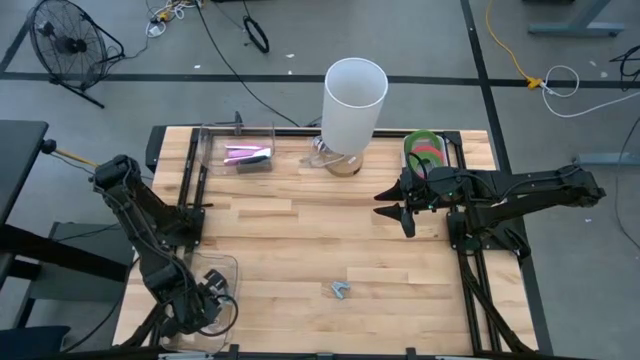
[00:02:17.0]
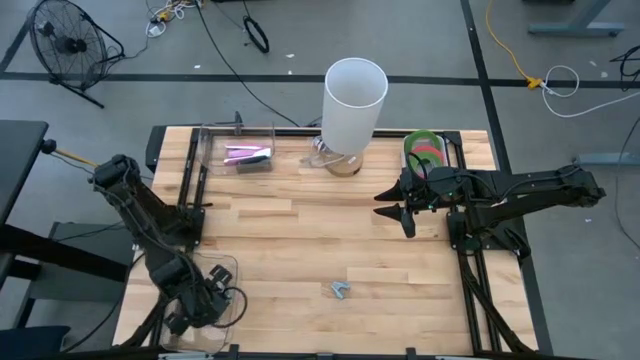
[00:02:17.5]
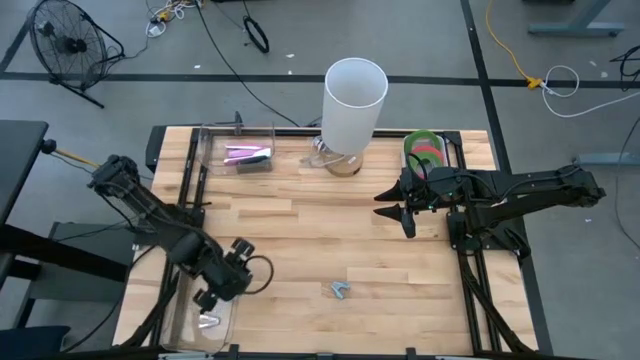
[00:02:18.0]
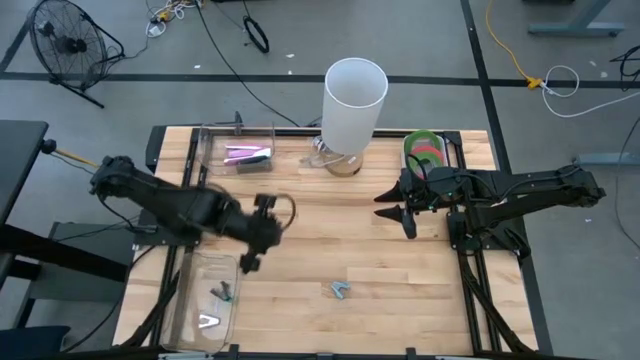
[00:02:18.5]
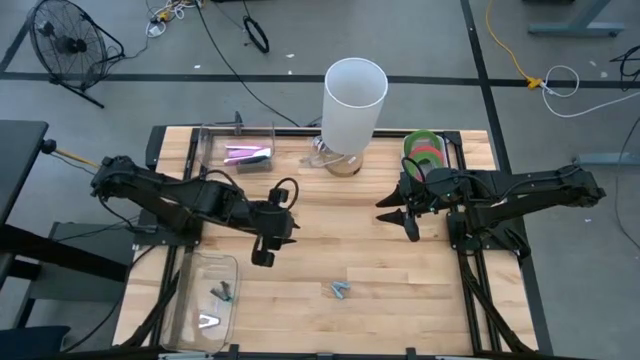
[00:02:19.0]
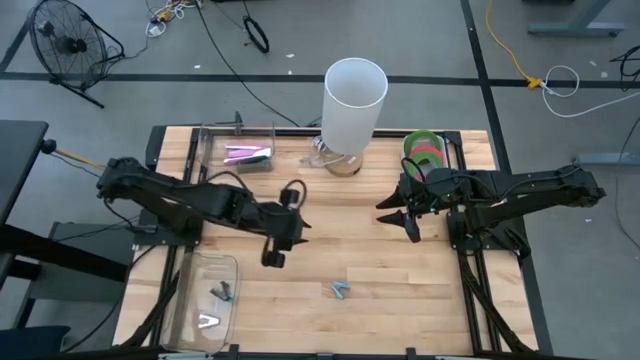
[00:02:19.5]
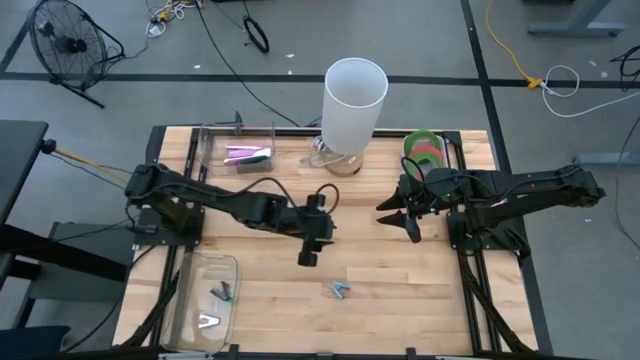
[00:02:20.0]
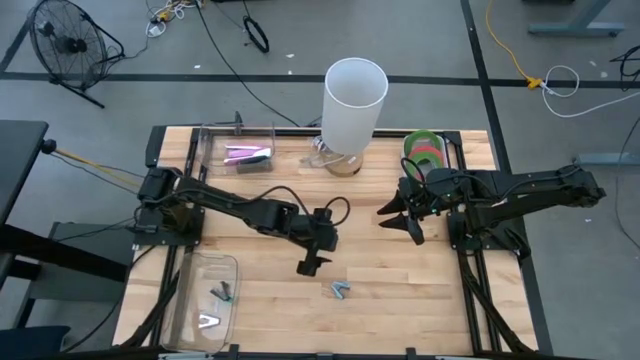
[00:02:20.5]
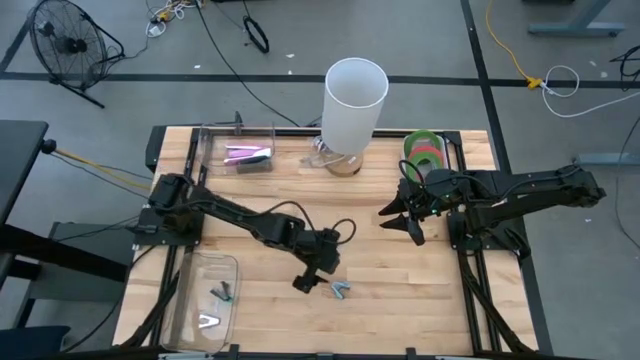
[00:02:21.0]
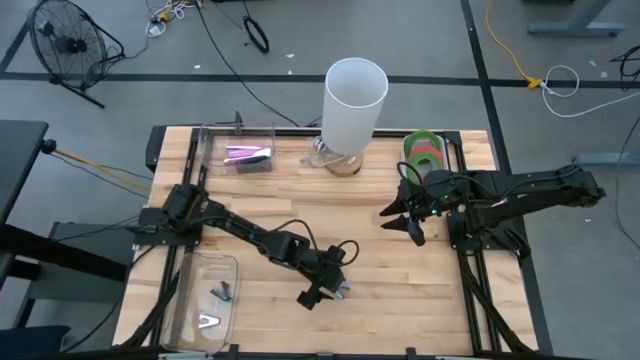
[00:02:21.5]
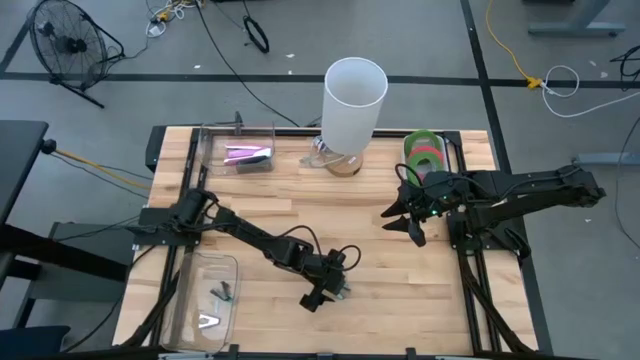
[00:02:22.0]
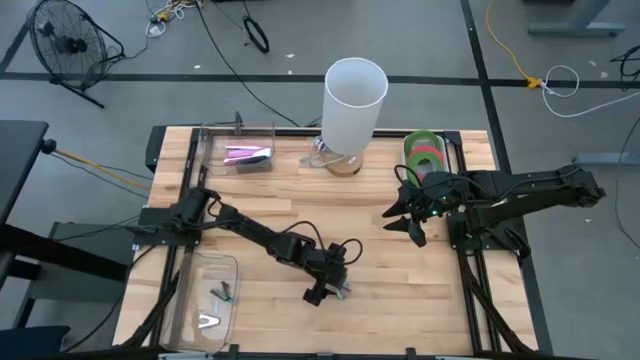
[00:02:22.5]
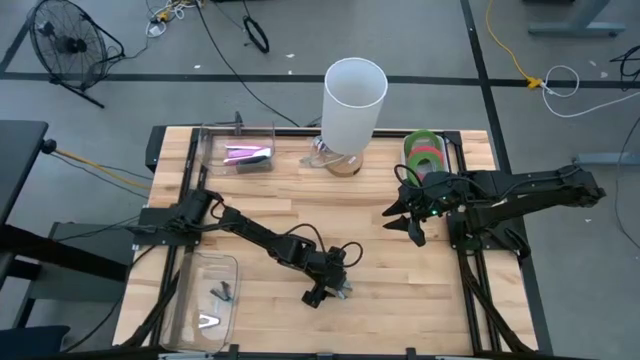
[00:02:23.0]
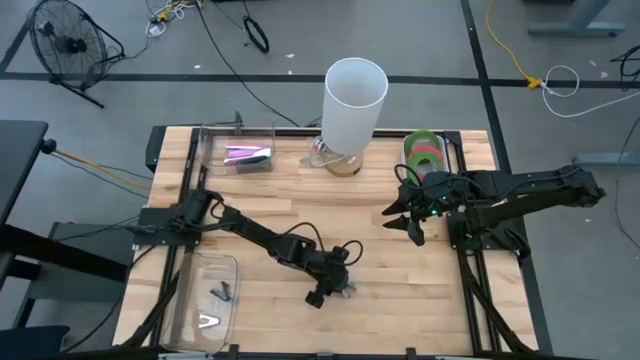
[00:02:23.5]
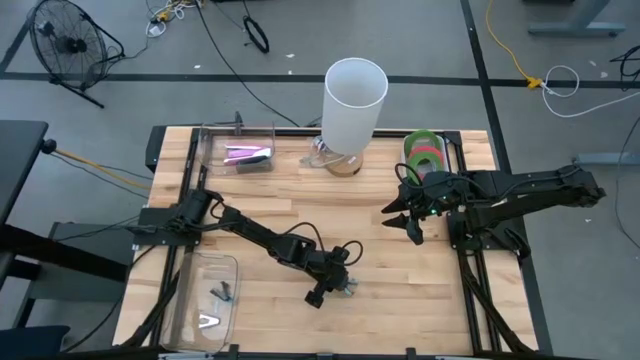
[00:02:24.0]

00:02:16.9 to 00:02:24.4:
Task: Pick and place Stapler, Stapler remover, tape
Put the light blue staple remover into the bottom transparent bin

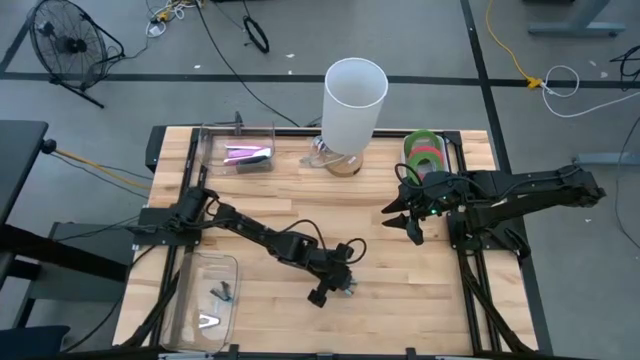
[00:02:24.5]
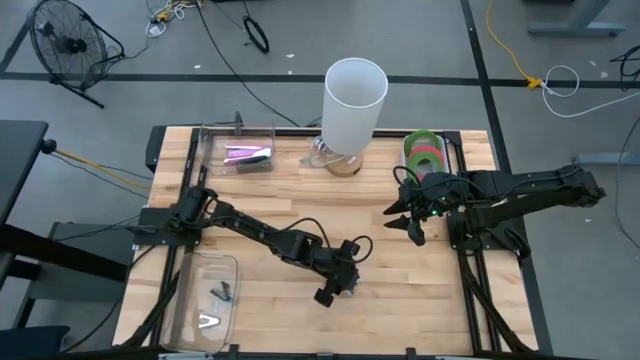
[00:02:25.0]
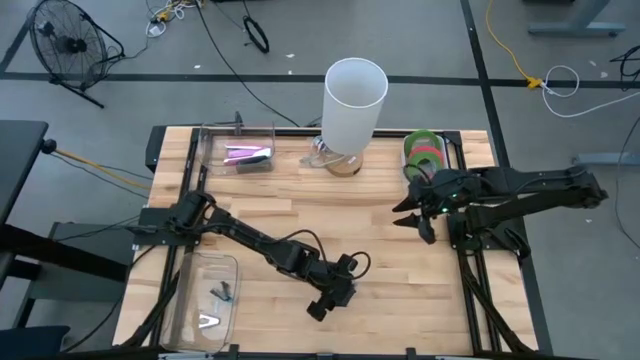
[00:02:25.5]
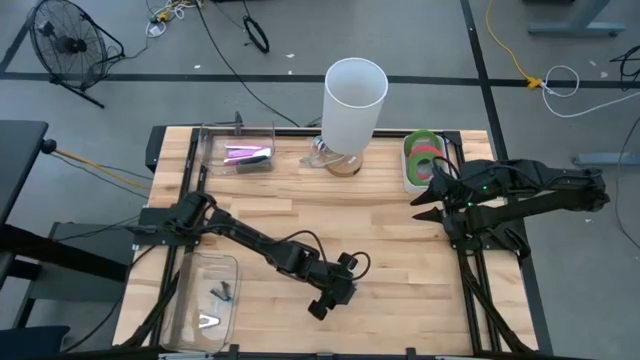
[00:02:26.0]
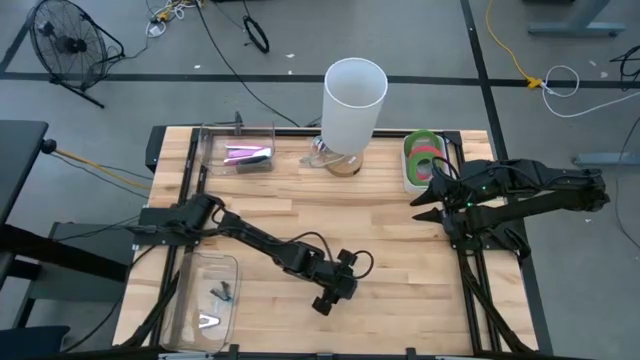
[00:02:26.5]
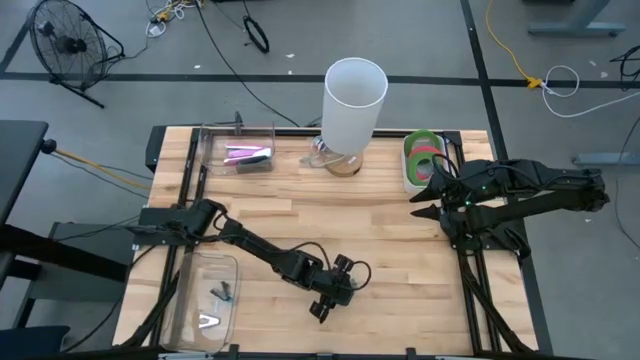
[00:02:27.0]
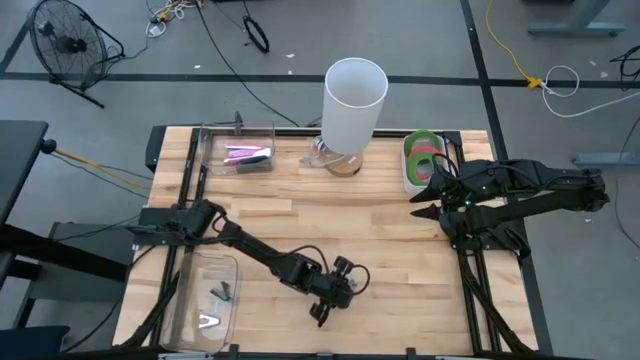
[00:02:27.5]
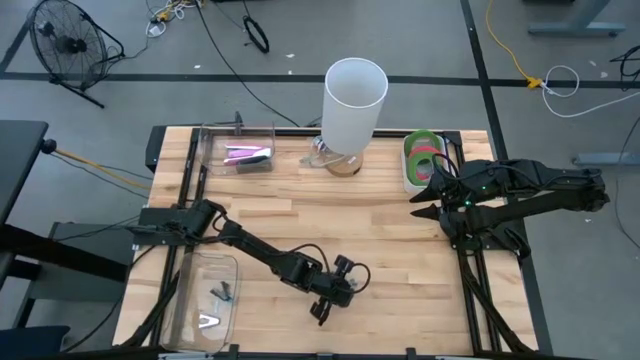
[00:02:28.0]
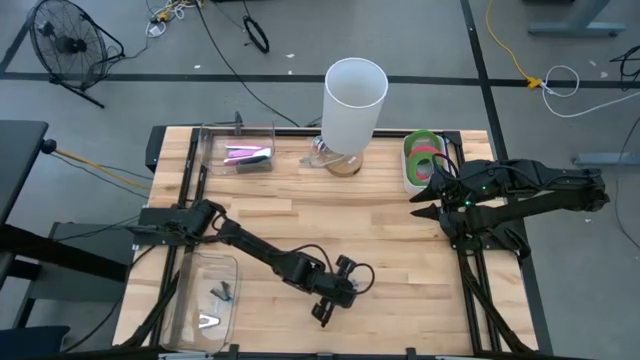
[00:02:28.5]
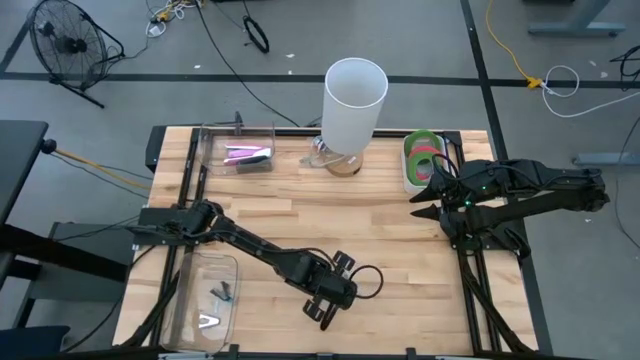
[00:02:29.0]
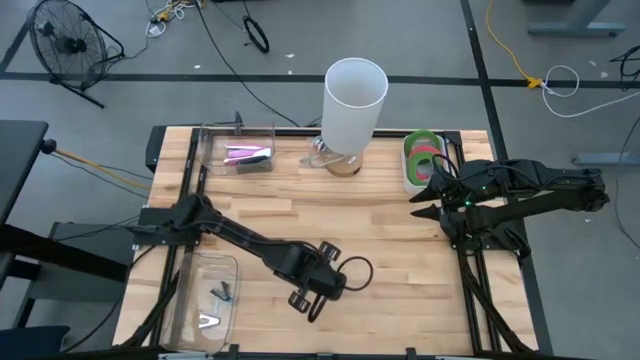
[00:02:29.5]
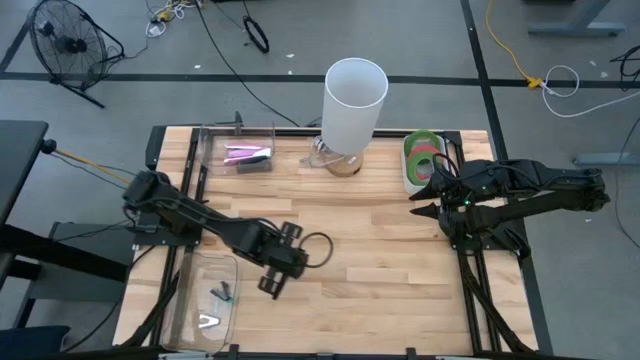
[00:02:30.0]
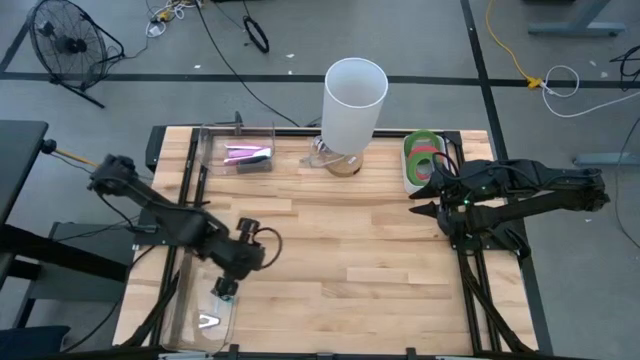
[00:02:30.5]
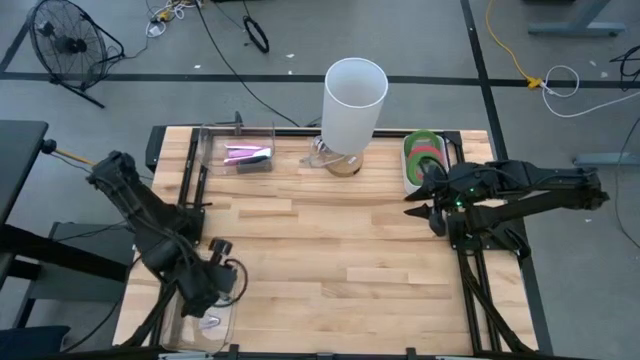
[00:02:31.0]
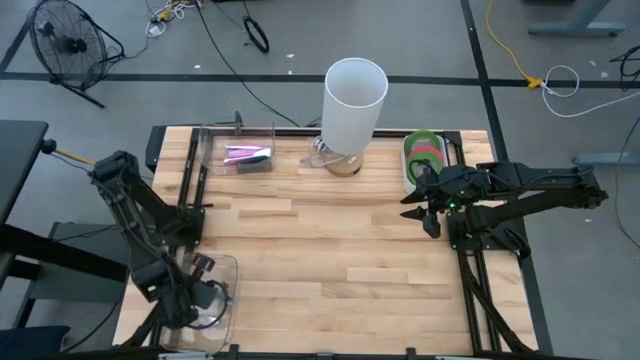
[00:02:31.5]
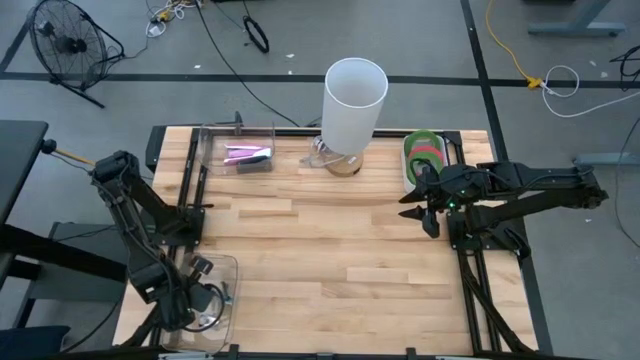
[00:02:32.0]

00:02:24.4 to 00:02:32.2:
Put the light blue staple remover into the bottom transparent bin
